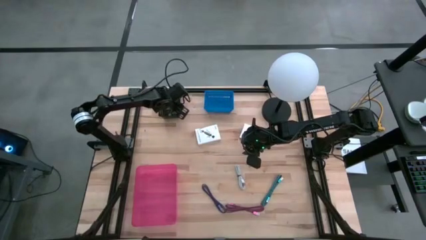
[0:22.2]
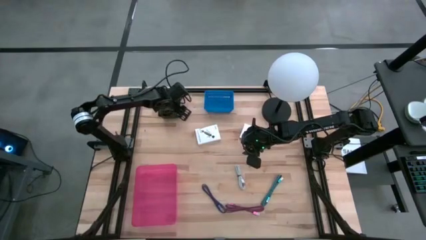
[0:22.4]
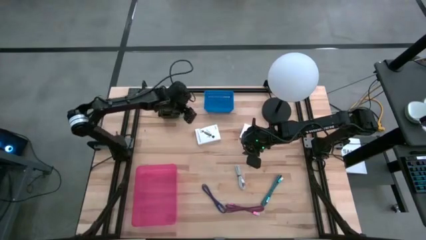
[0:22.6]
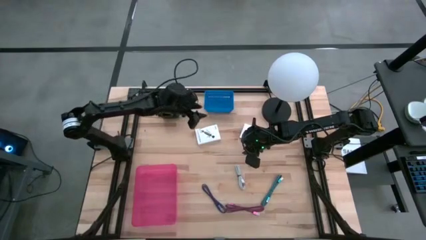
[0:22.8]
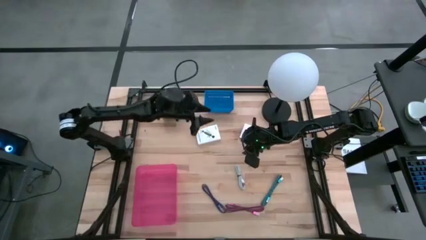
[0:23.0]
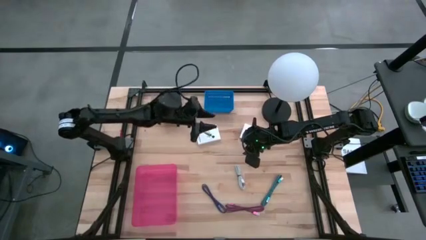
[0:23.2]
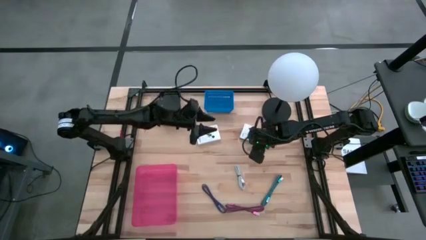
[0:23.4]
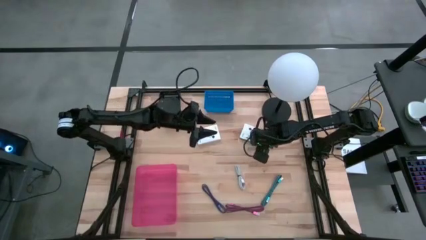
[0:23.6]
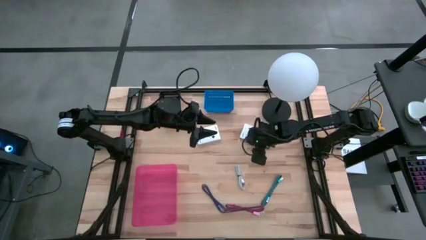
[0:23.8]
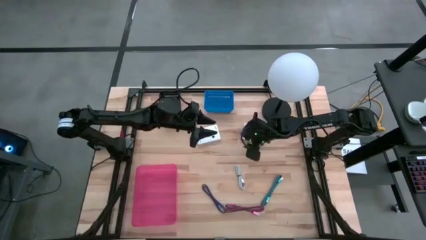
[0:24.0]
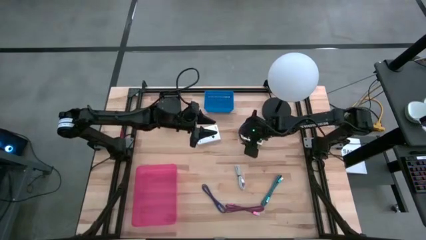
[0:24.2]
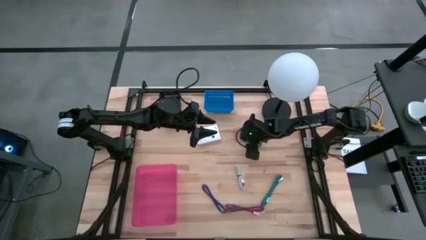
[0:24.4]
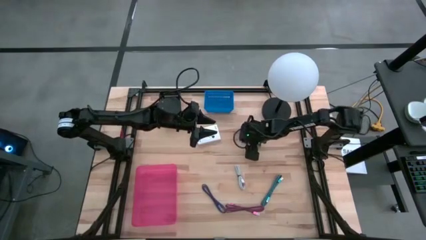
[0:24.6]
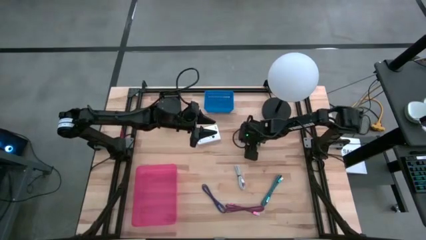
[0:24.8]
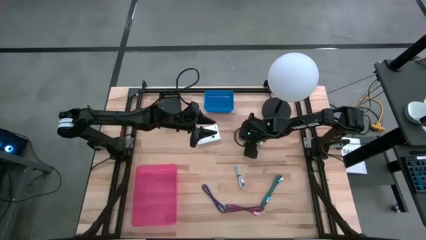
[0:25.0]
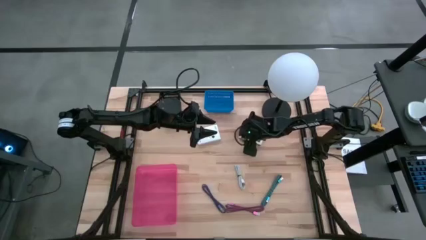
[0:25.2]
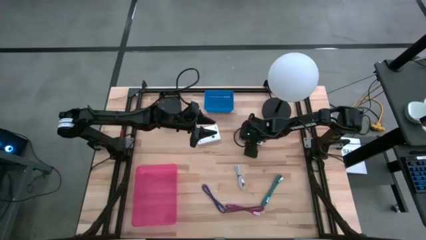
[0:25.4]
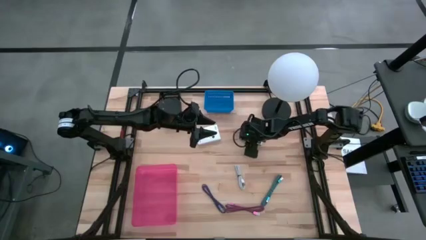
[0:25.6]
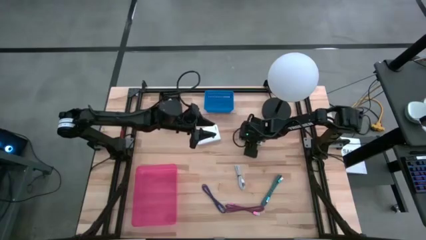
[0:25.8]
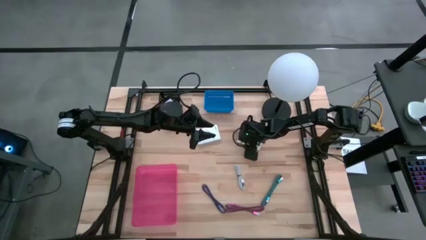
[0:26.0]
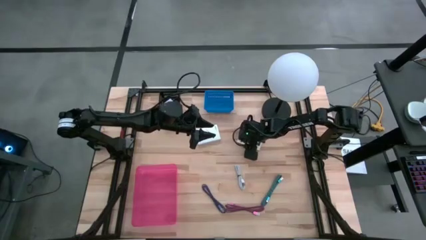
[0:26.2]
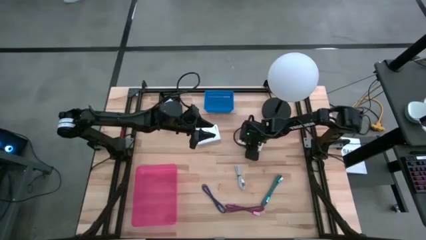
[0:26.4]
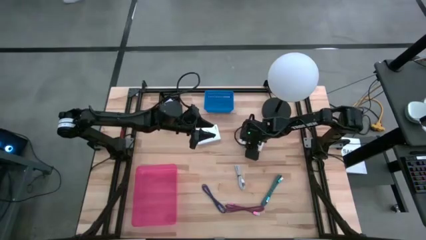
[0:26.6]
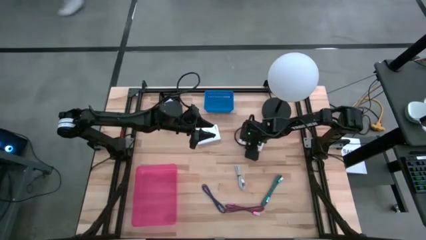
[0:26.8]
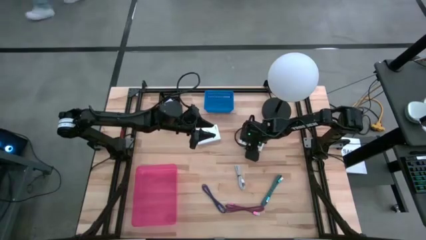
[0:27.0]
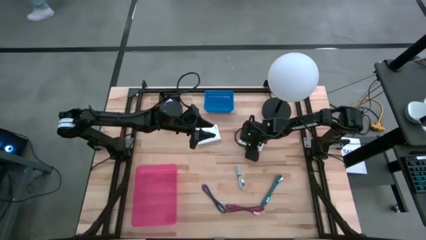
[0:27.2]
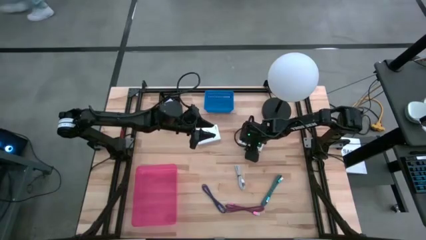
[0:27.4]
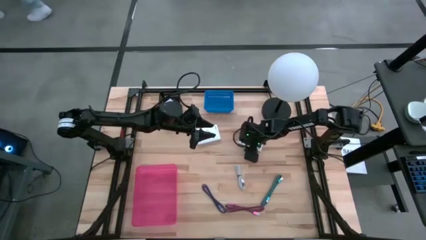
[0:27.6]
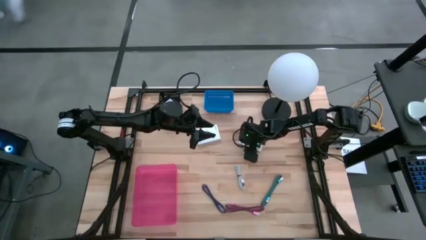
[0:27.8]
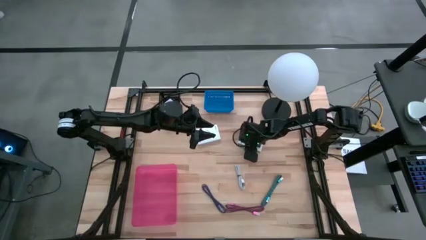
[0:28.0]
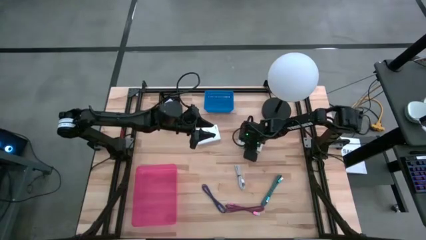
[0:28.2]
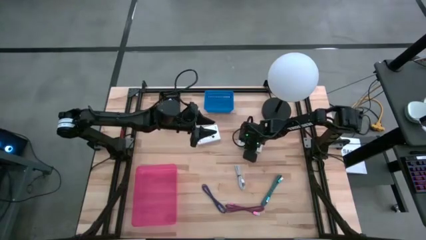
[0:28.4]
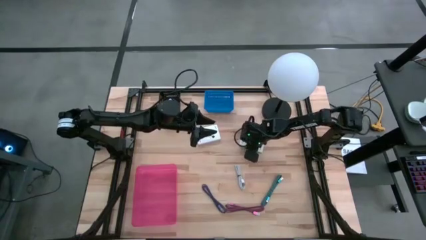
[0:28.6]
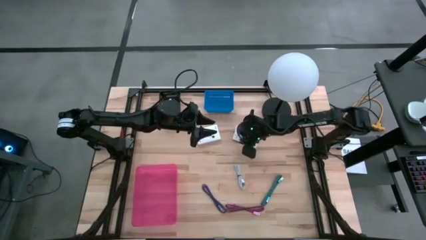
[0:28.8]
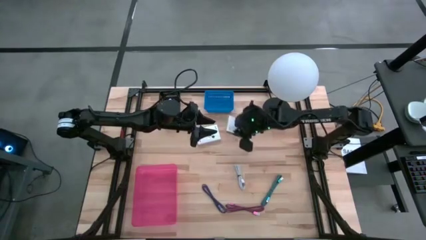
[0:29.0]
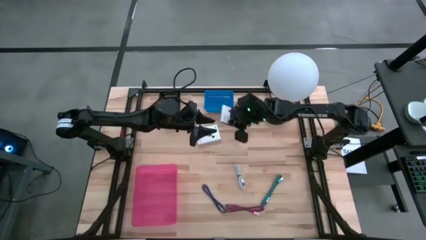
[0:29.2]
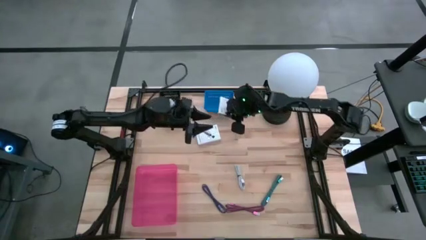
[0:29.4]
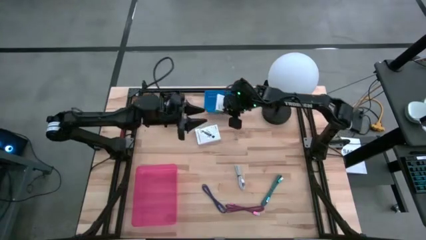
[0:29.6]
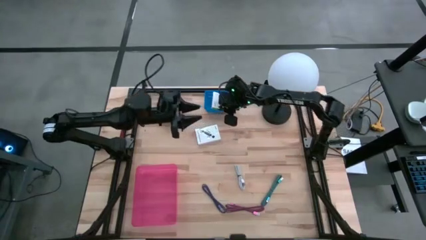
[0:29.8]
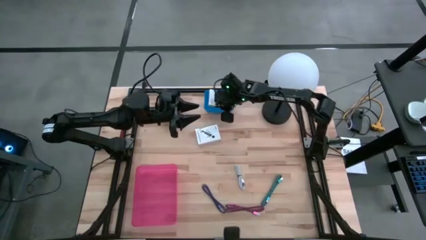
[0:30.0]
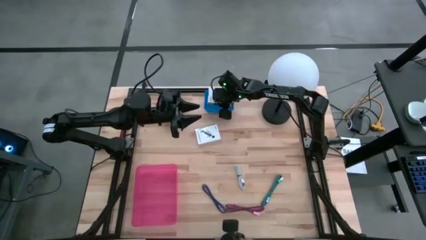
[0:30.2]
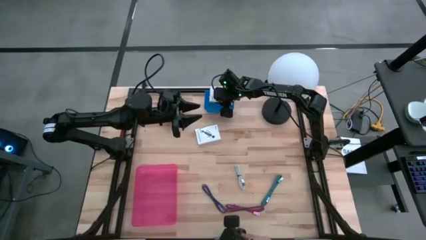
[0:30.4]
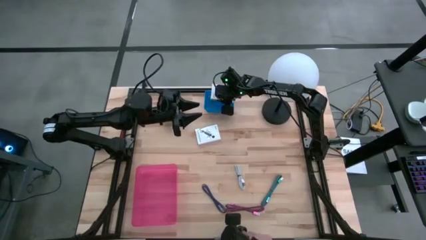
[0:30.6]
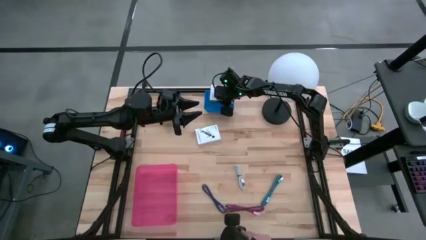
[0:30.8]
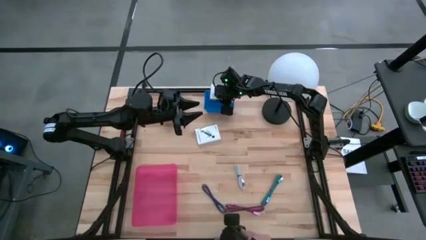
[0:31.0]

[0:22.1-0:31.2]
Task: Pick and place items into bin
Put the white USB box into the blue bin

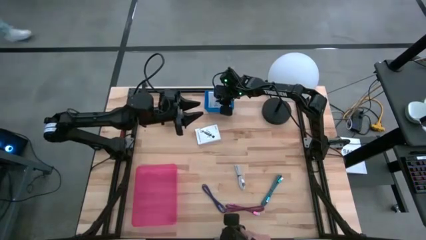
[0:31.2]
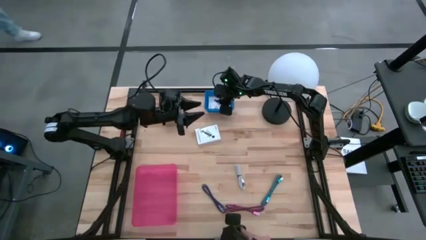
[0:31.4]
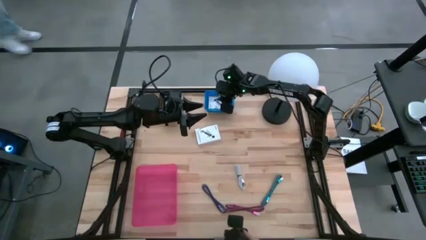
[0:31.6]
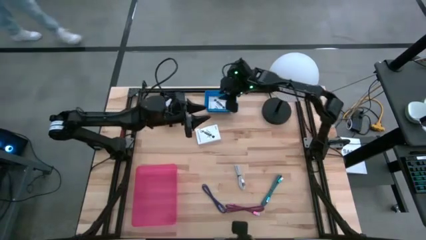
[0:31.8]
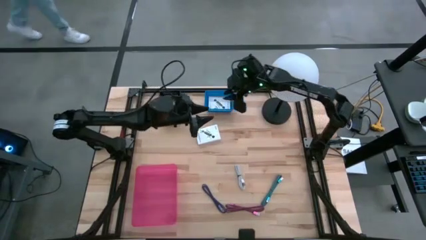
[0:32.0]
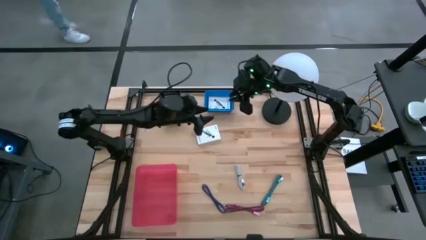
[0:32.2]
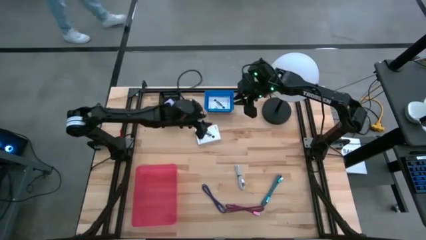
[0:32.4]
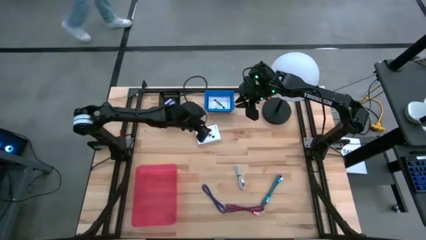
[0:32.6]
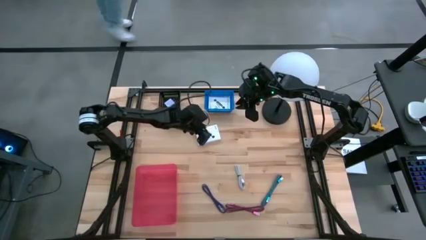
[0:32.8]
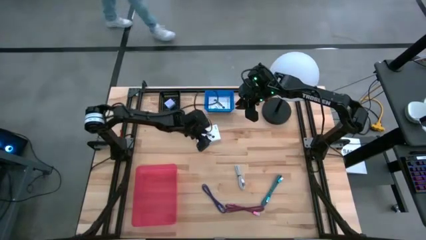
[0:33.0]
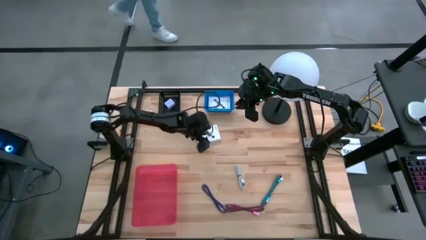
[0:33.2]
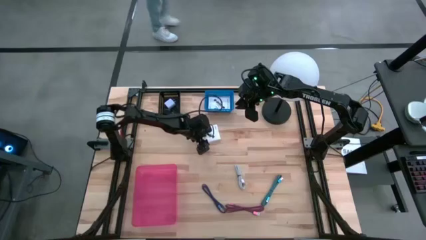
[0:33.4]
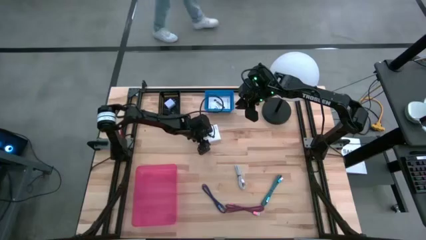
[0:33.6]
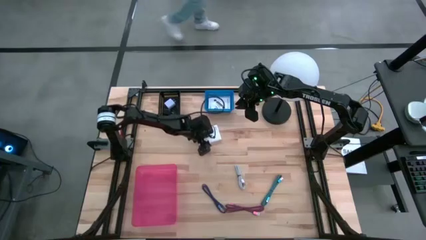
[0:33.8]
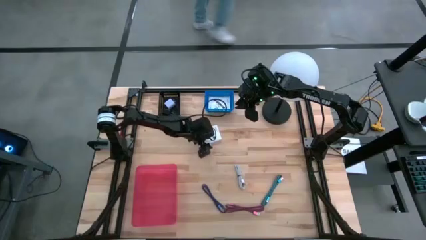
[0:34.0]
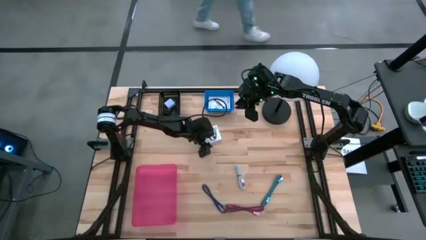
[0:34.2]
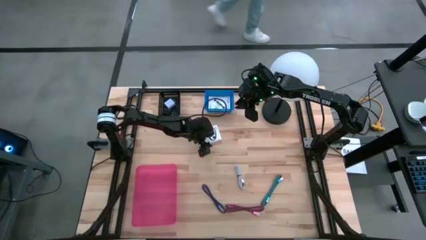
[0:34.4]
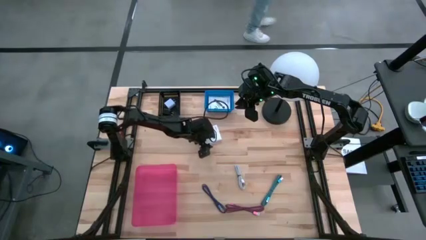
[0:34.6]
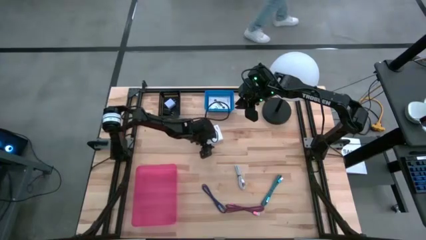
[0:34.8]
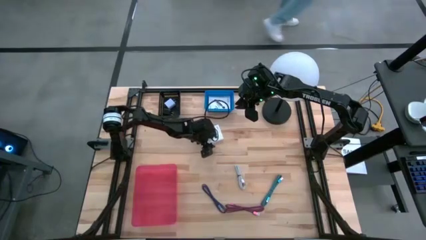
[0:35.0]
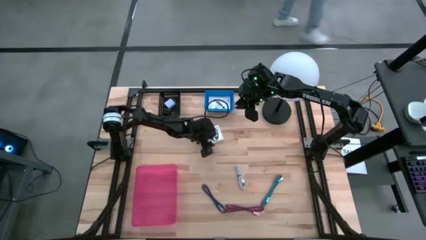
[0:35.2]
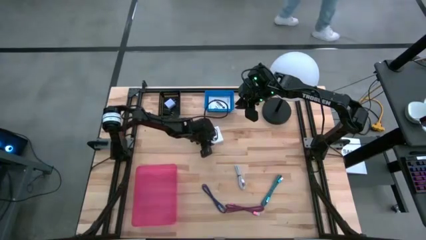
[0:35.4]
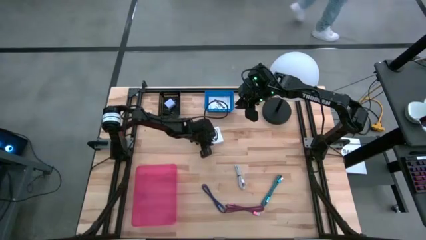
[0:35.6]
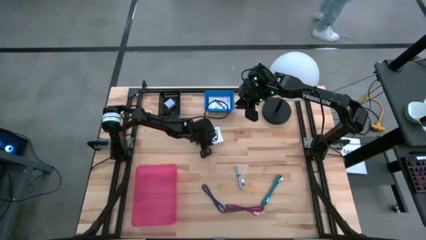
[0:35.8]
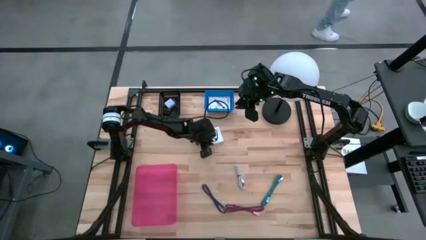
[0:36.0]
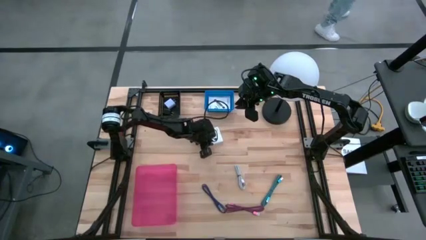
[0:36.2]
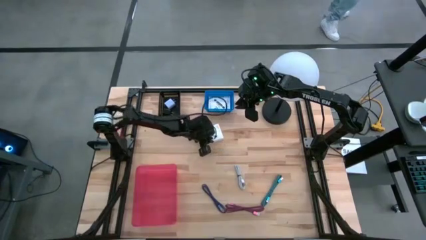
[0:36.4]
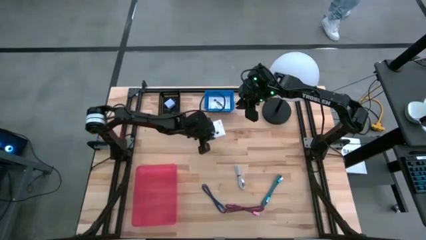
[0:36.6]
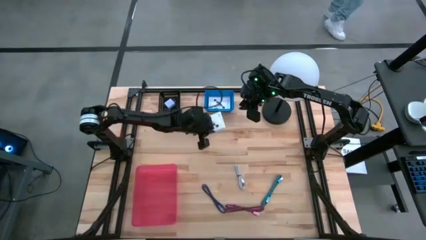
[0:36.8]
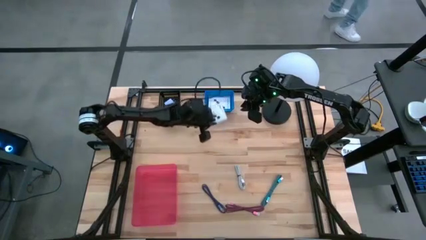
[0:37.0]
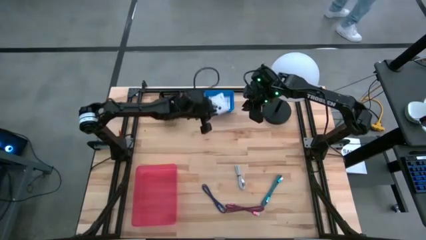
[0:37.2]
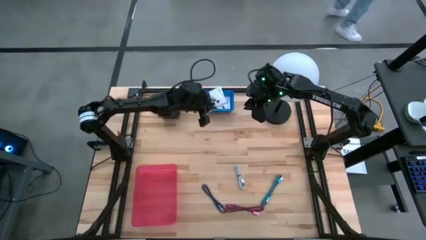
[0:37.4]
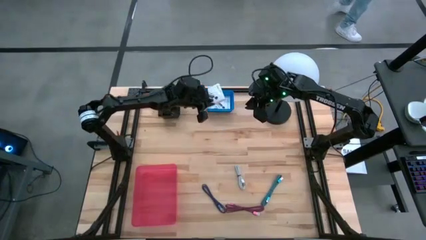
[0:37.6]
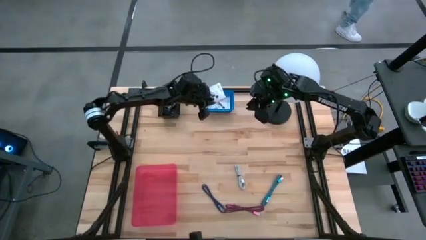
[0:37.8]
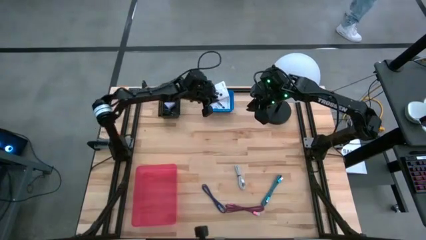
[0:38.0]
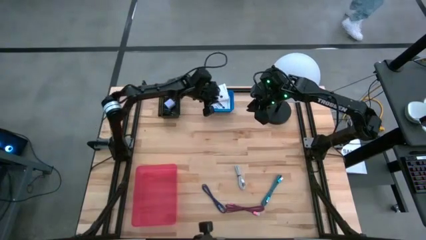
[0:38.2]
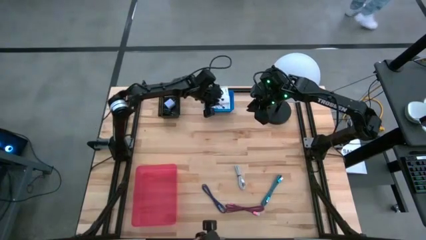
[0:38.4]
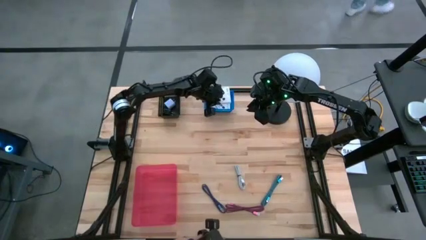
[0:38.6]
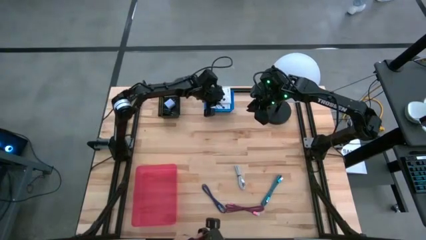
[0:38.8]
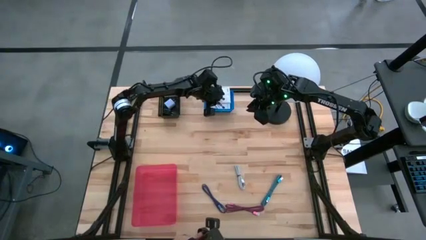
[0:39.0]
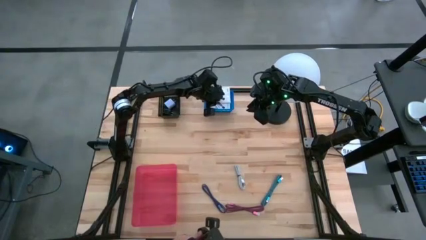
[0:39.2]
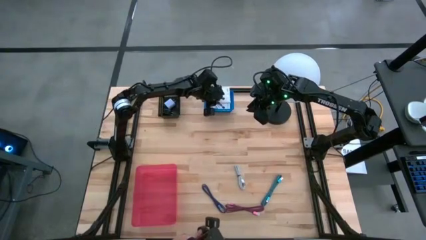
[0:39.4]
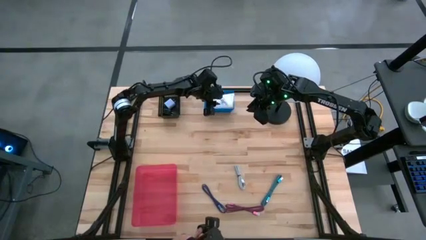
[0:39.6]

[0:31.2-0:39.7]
Put the white USB box into the blue bin
